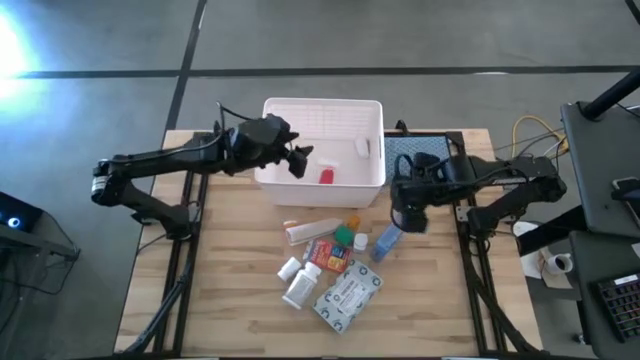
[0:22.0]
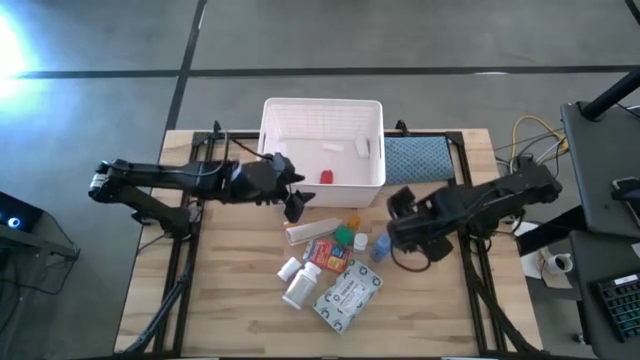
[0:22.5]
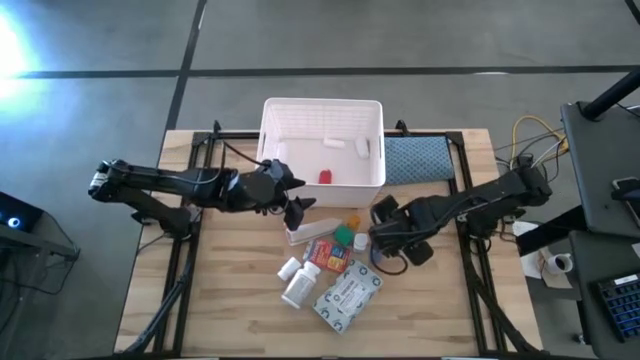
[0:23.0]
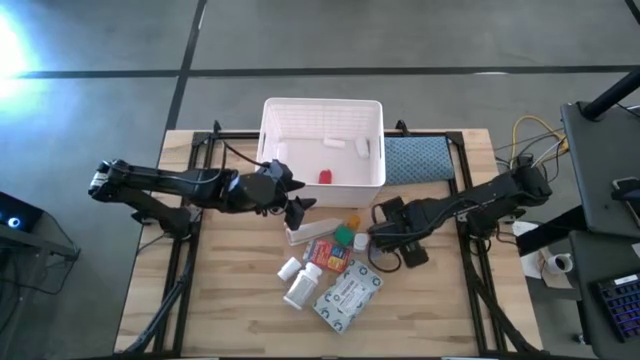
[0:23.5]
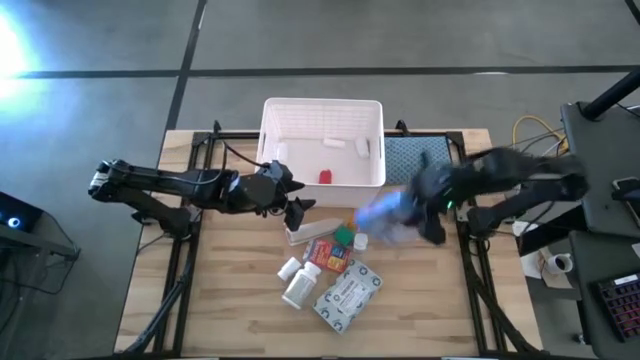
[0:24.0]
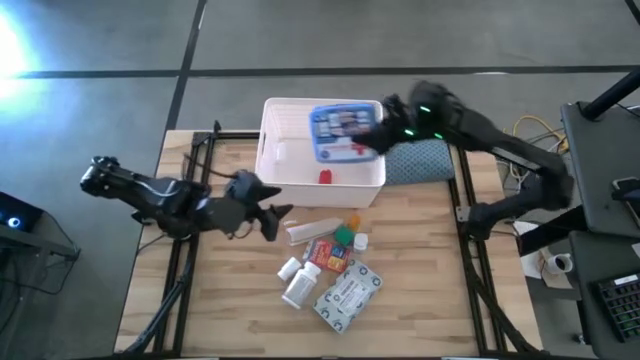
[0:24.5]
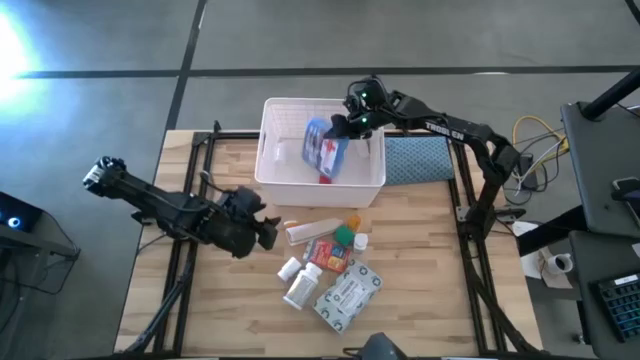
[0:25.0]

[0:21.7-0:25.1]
Task: Pick & place medical supplies in basket/bin
Put the blue first aid kit into the white bin

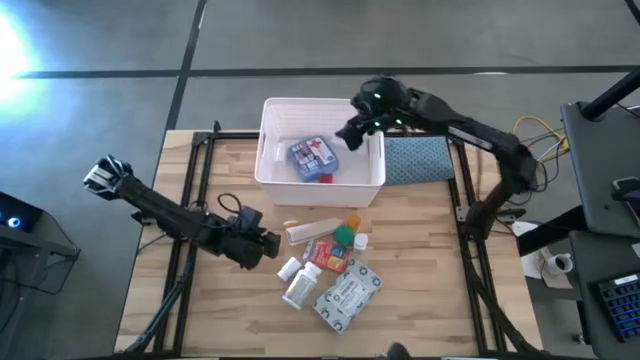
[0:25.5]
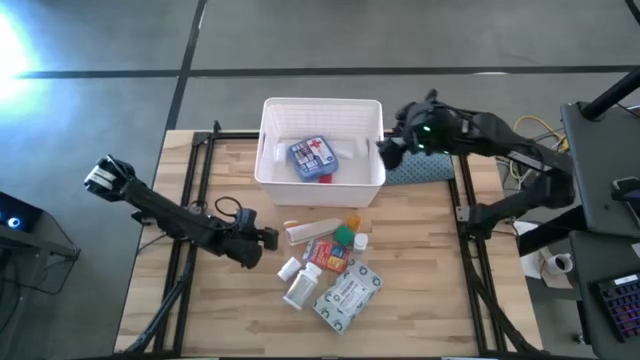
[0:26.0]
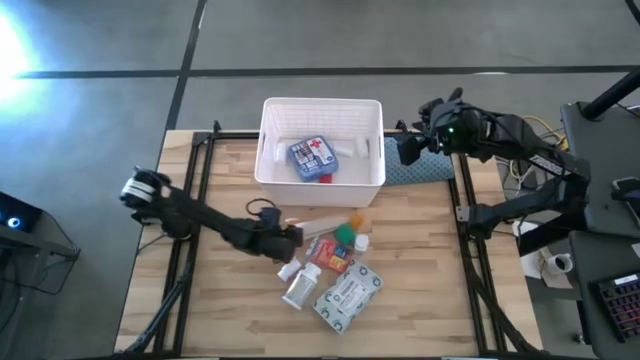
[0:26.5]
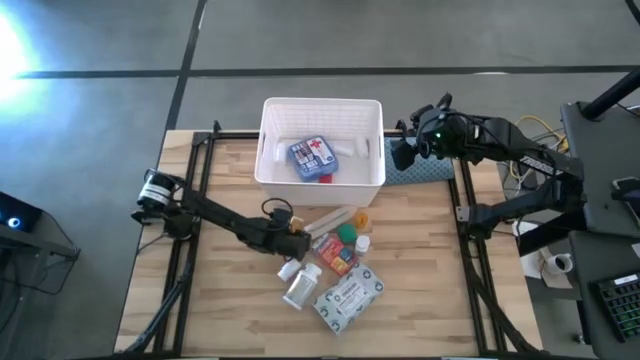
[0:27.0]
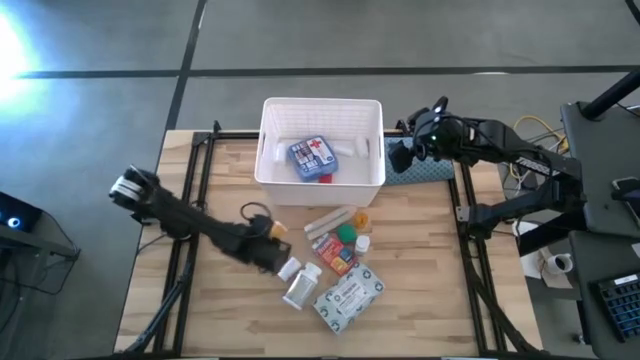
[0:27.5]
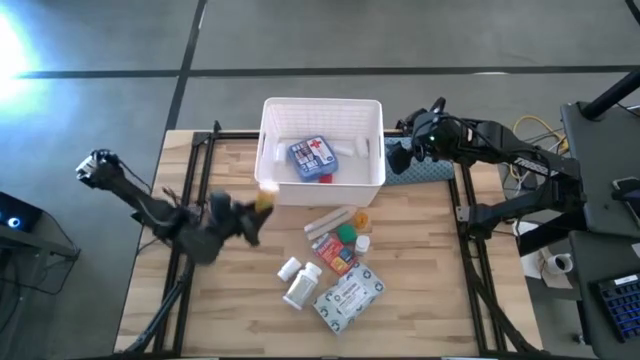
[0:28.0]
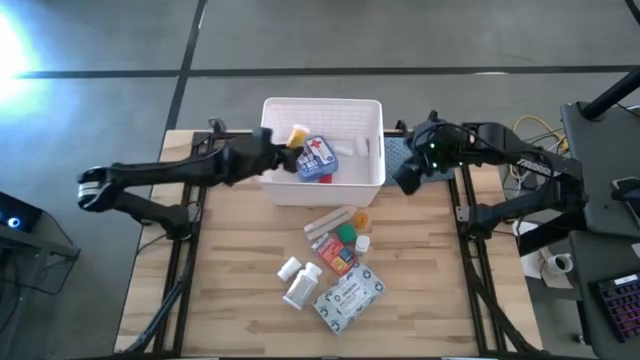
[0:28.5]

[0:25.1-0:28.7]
Put the left orange medicine bottle into the white bin

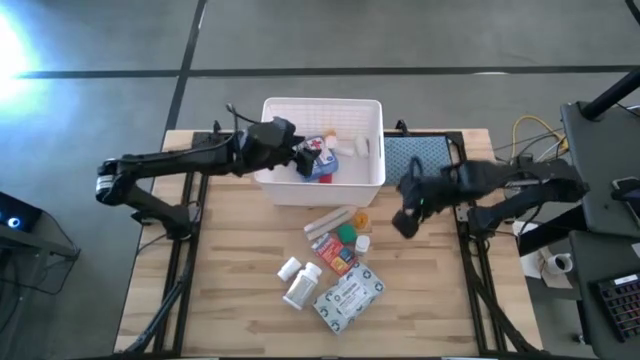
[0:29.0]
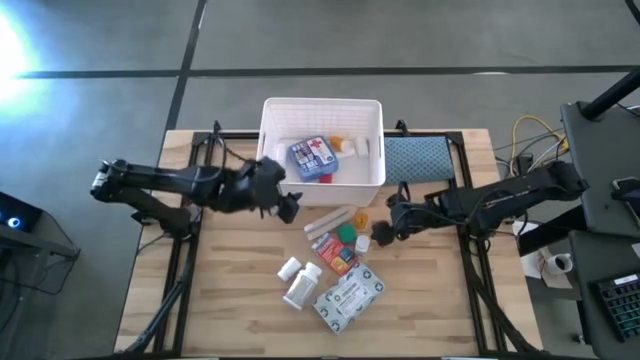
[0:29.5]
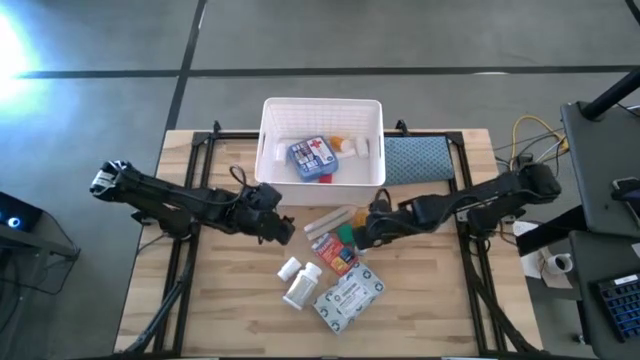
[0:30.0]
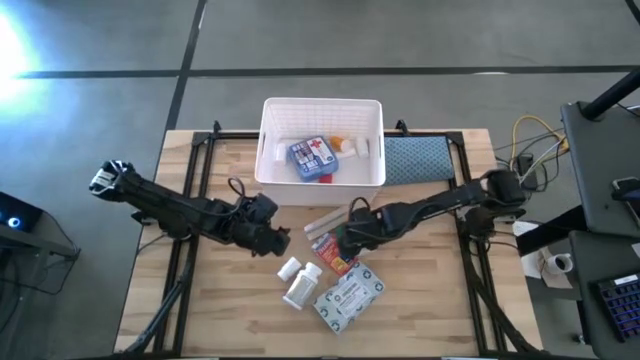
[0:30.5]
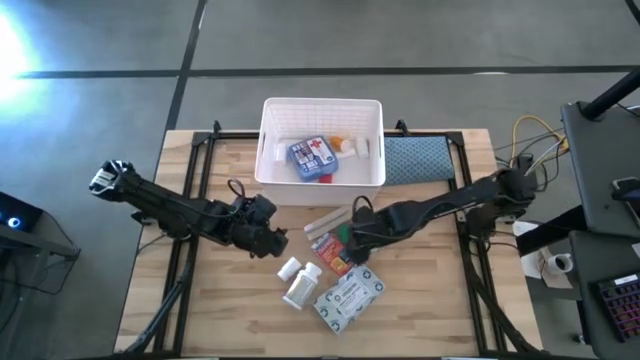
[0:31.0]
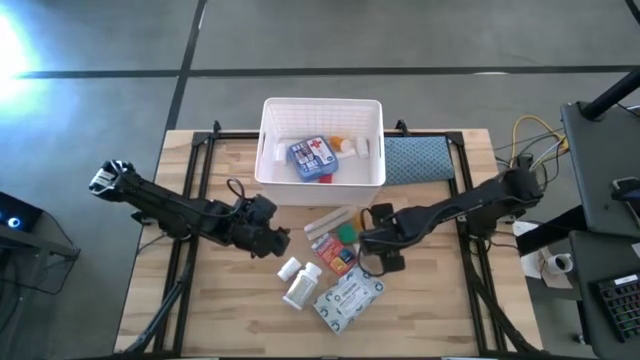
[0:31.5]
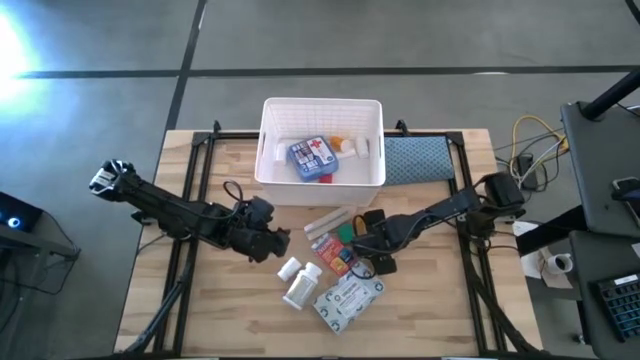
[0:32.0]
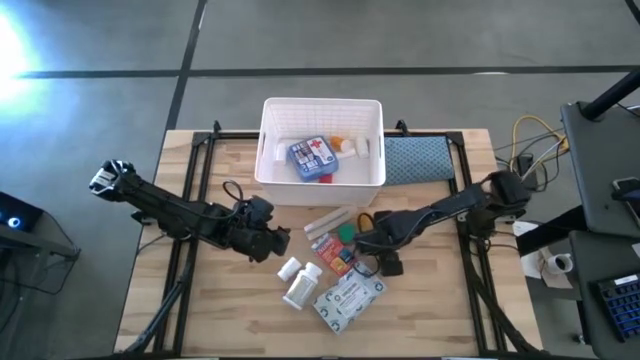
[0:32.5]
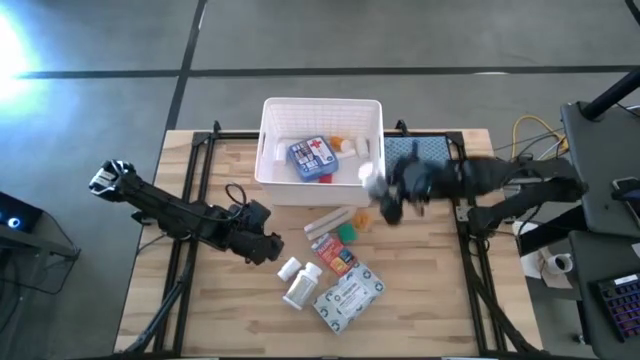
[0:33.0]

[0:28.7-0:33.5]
Put the white and blue medicine bottle into the white bin

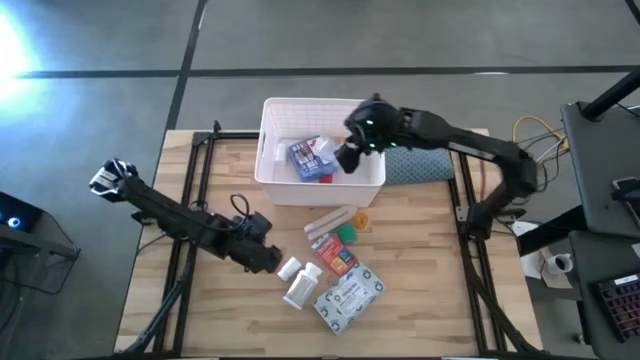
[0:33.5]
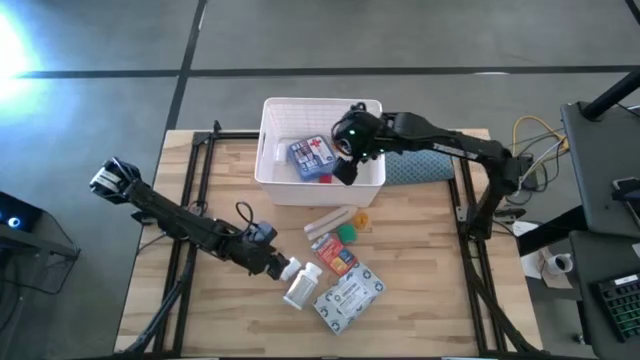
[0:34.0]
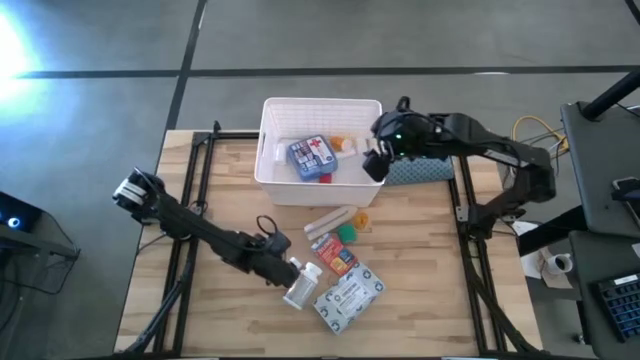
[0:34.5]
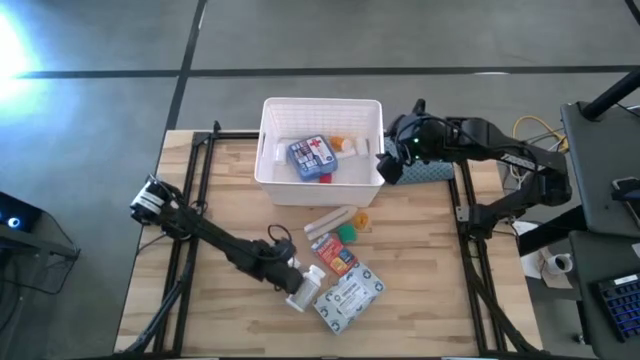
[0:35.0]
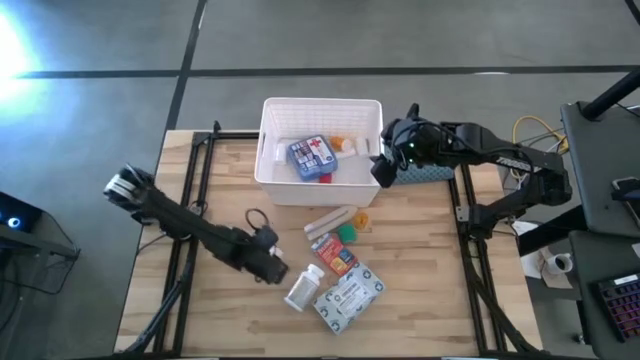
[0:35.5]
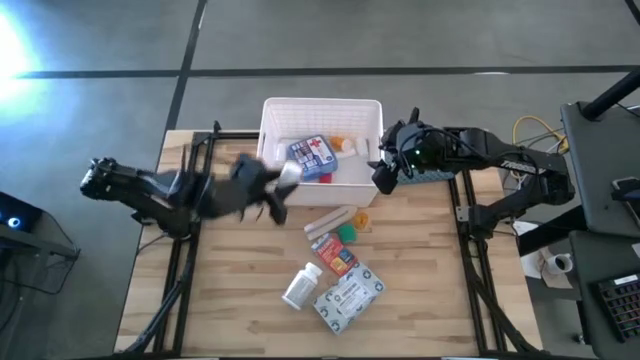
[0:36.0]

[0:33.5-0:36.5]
Put the white medicine bottle into the white bin

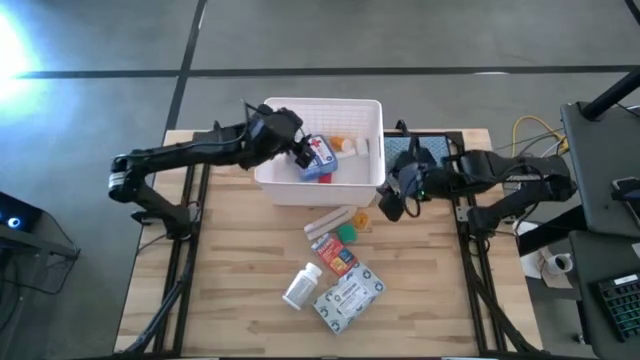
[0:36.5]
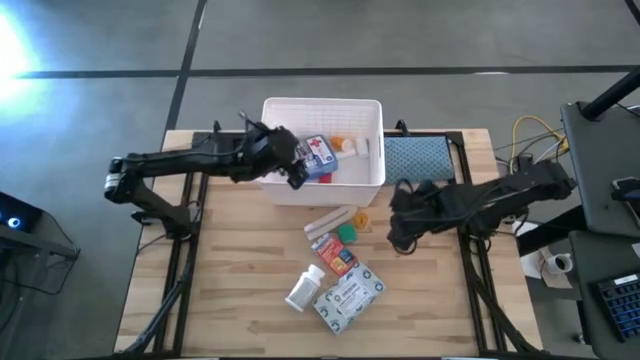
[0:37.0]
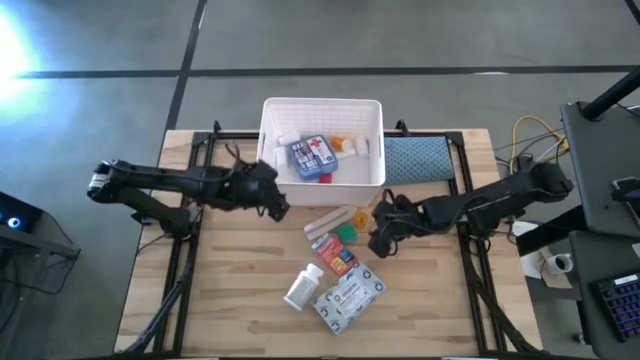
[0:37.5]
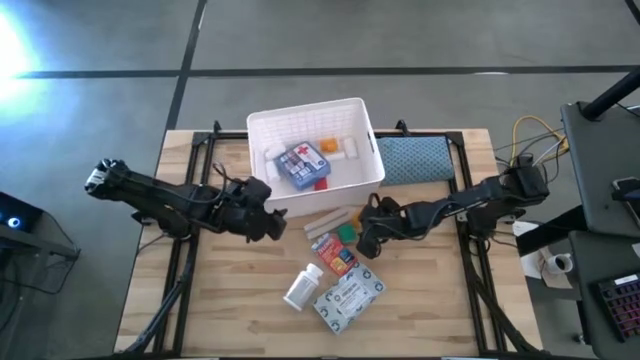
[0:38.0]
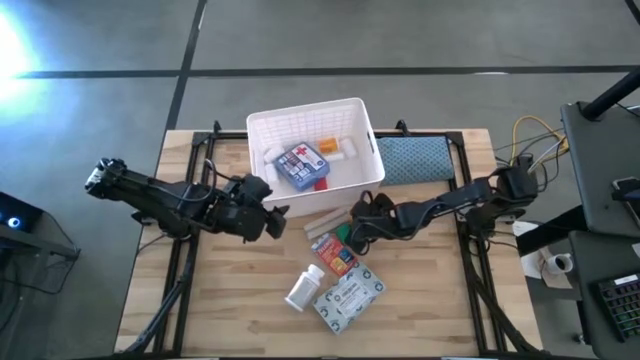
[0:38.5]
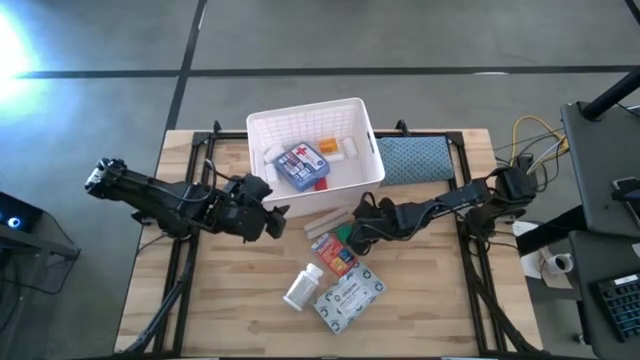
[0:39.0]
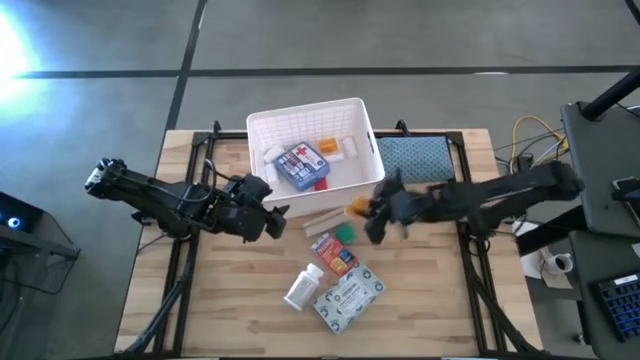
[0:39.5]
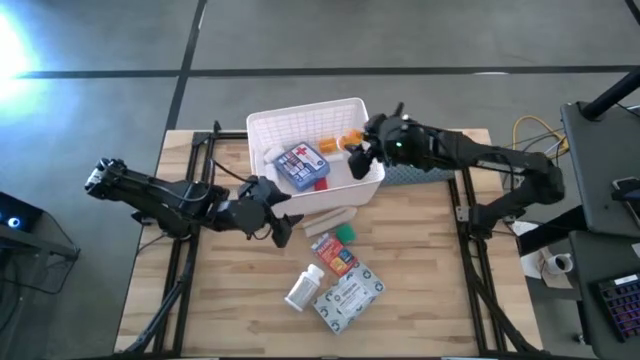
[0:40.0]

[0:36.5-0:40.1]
Put the orange medicine bottle into the white bin

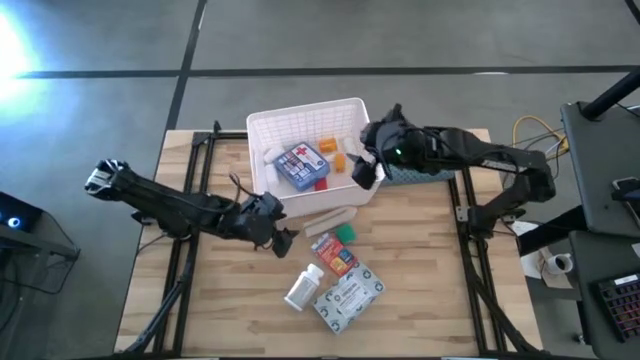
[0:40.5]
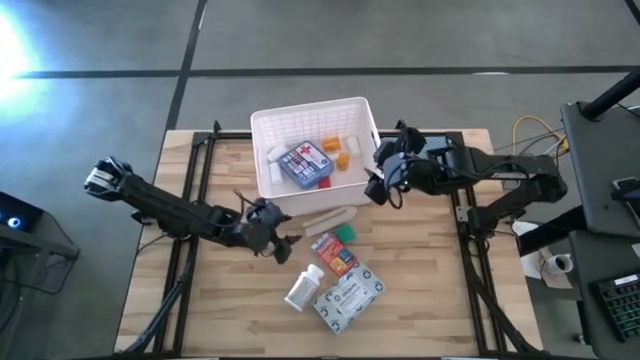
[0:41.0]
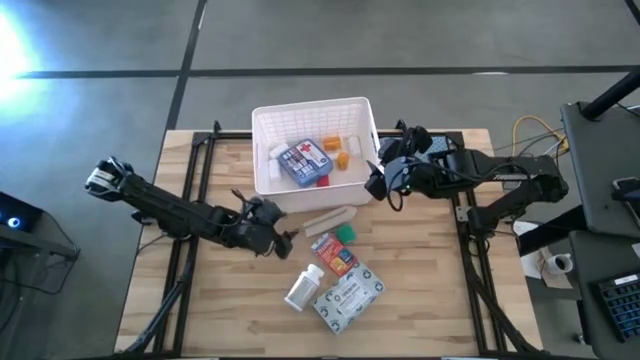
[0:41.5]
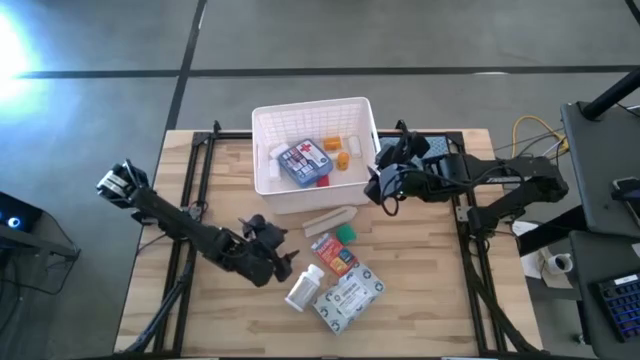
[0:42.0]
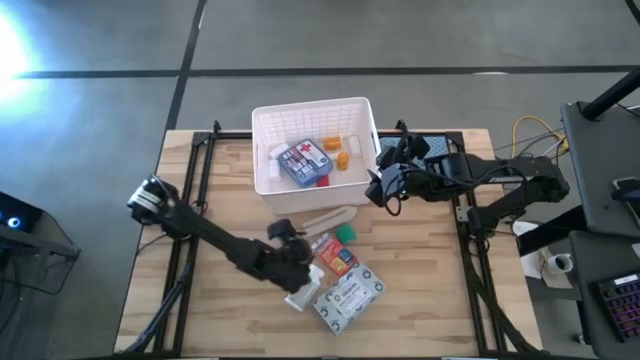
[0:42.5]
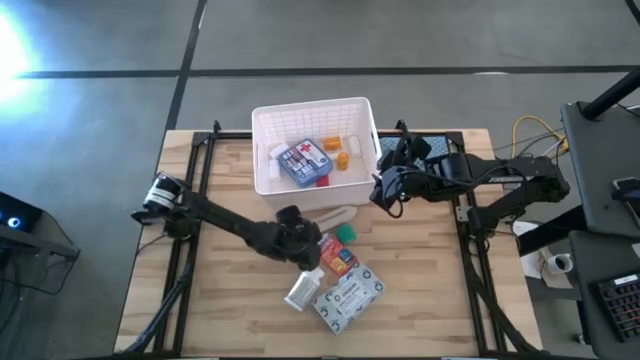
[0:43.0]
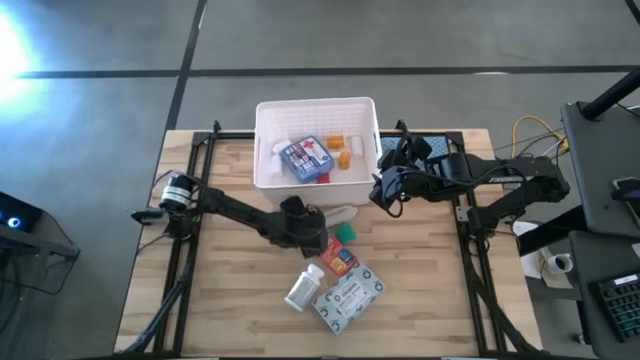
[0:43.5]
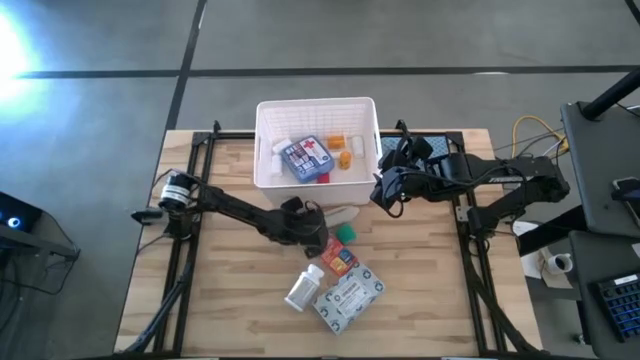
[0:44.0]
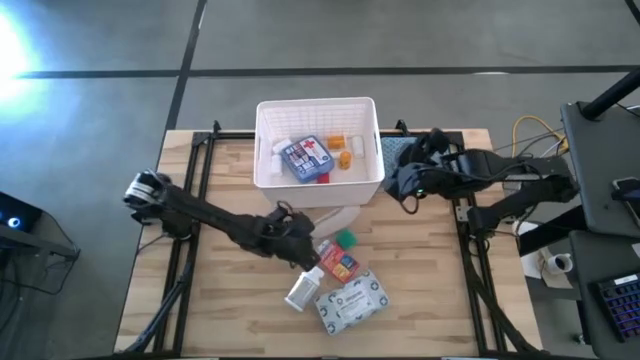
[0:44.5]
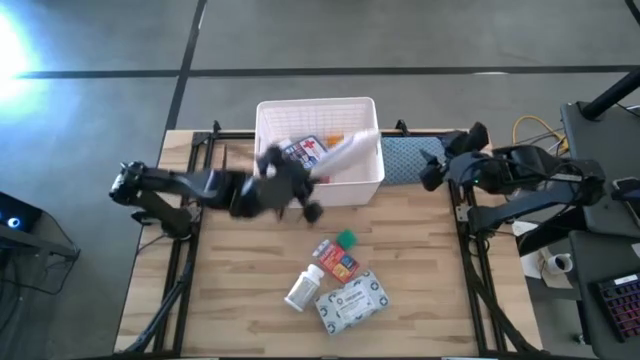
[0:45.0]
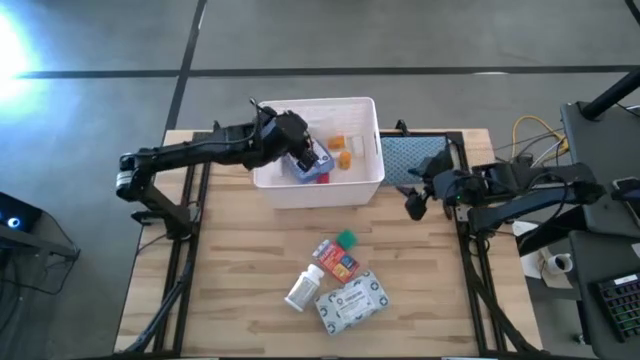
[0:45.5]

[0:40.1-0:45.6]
Put the white bandage into the white bin
